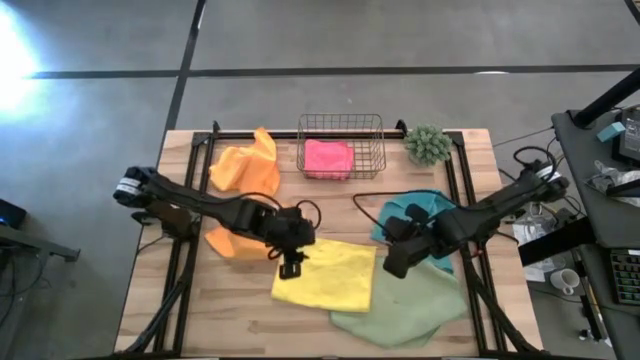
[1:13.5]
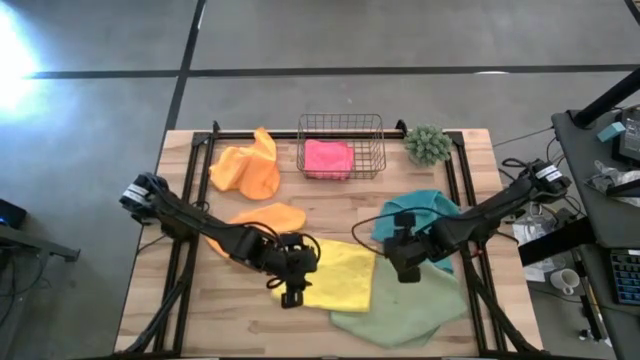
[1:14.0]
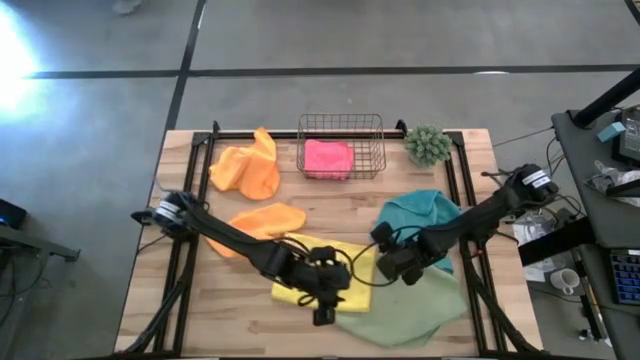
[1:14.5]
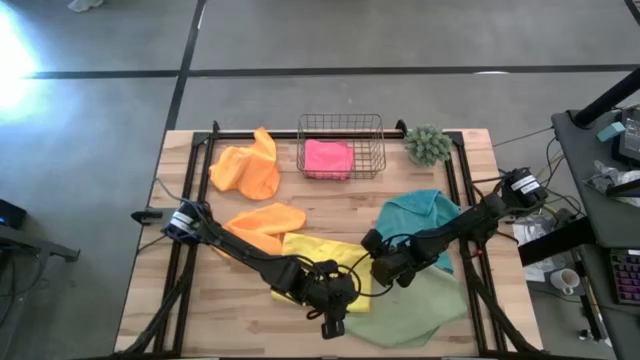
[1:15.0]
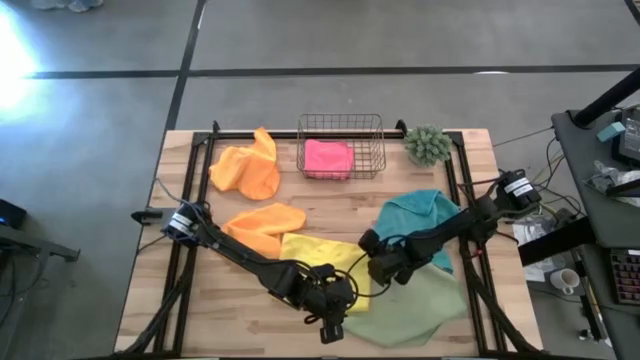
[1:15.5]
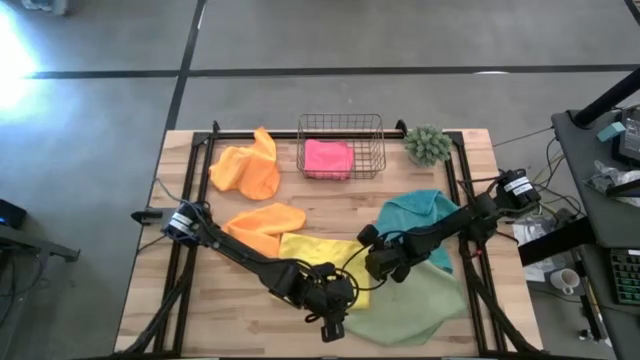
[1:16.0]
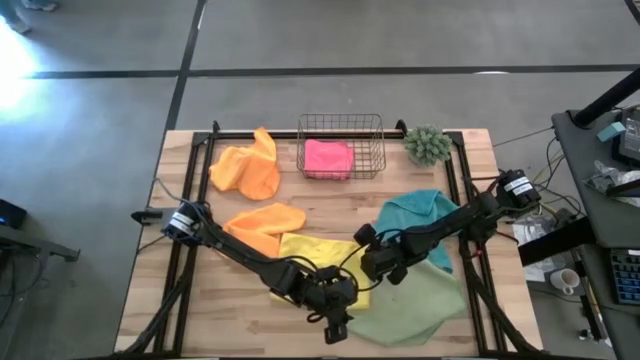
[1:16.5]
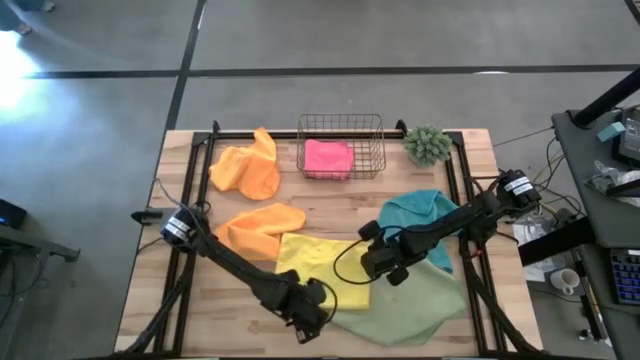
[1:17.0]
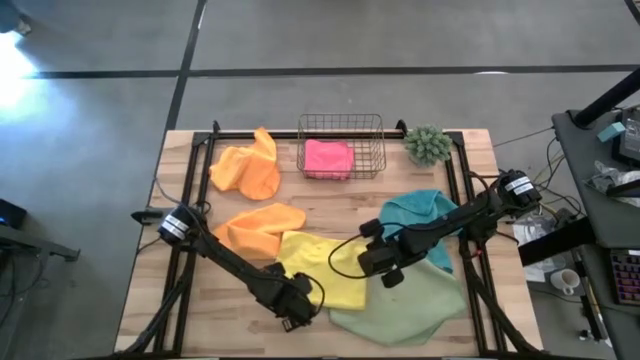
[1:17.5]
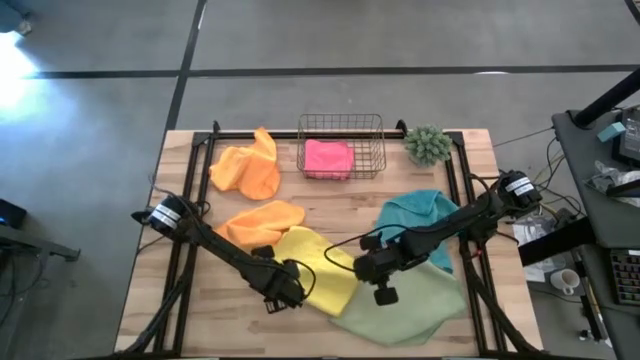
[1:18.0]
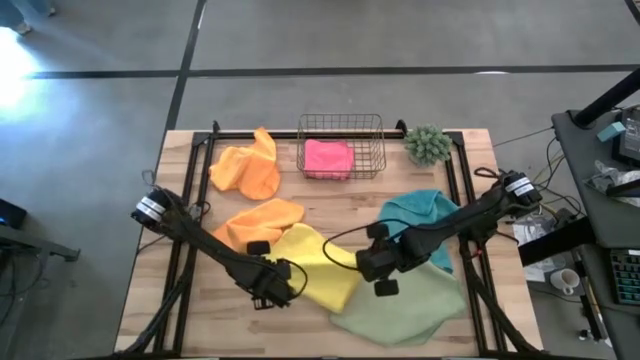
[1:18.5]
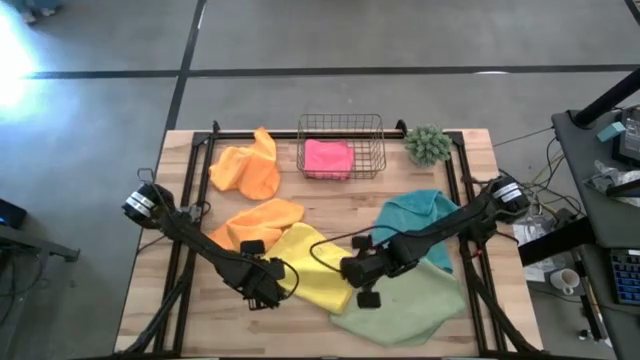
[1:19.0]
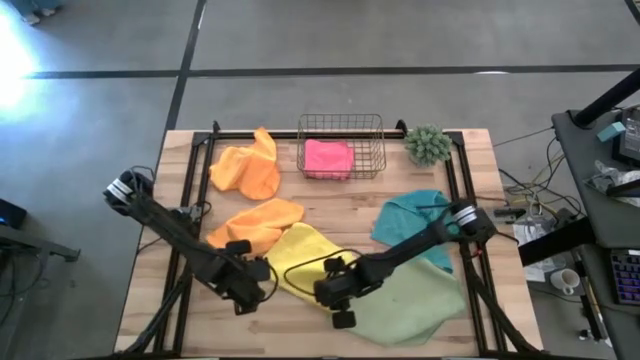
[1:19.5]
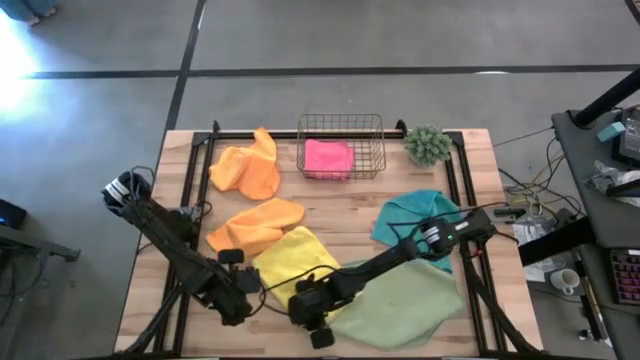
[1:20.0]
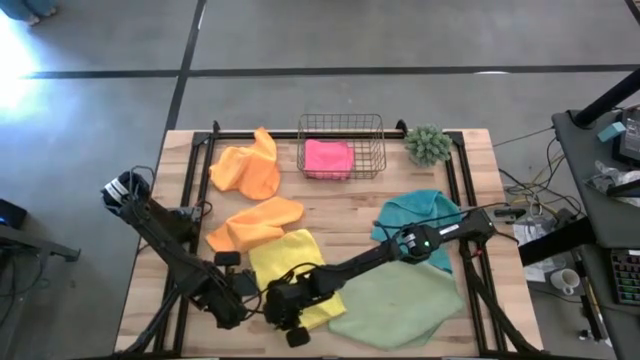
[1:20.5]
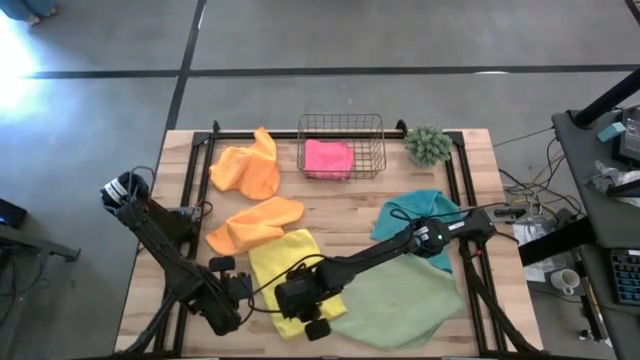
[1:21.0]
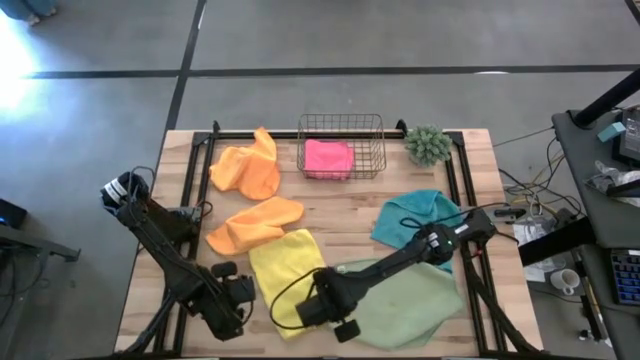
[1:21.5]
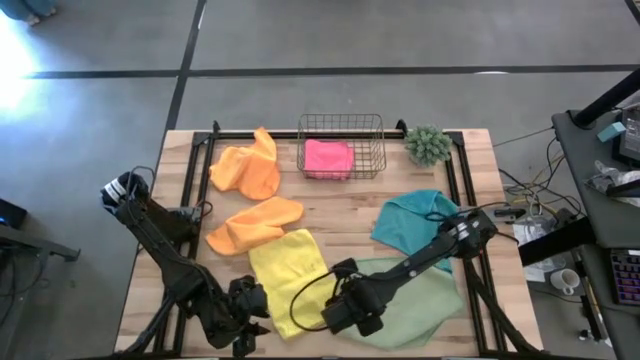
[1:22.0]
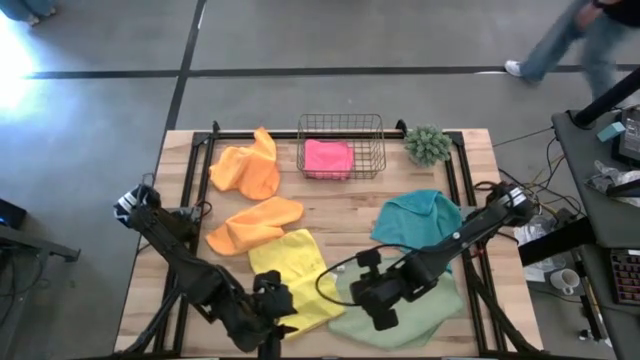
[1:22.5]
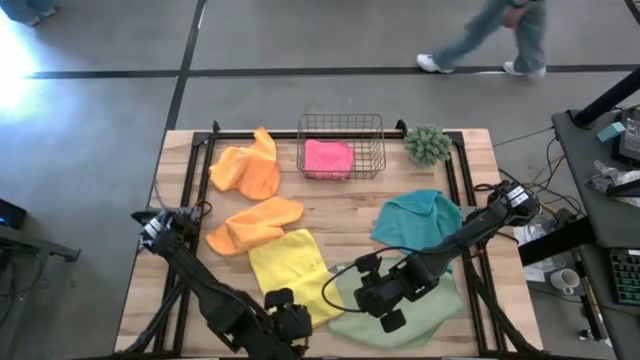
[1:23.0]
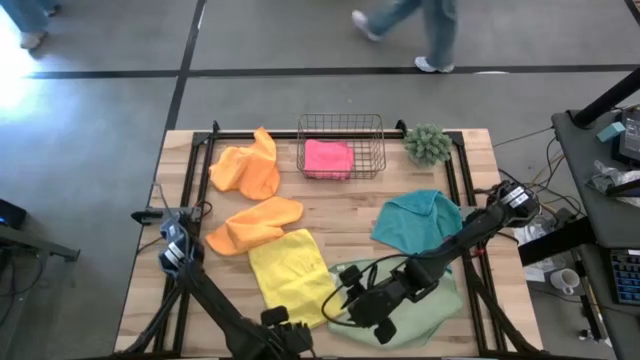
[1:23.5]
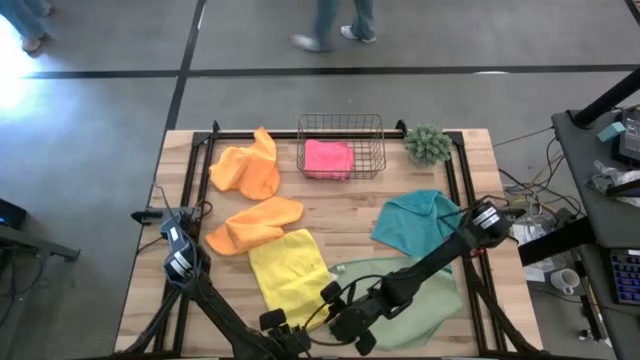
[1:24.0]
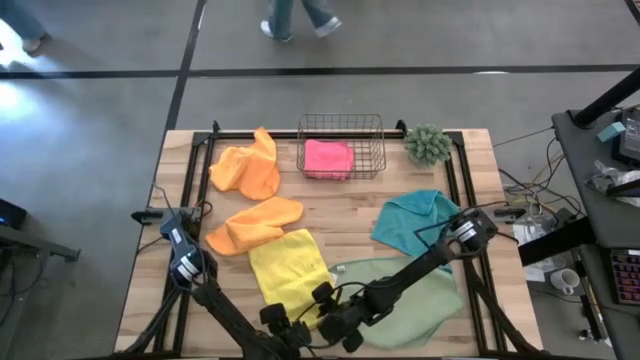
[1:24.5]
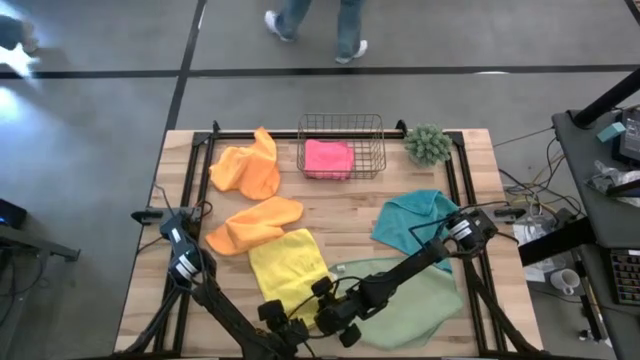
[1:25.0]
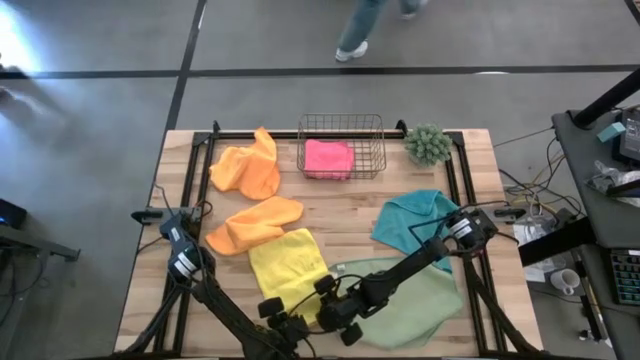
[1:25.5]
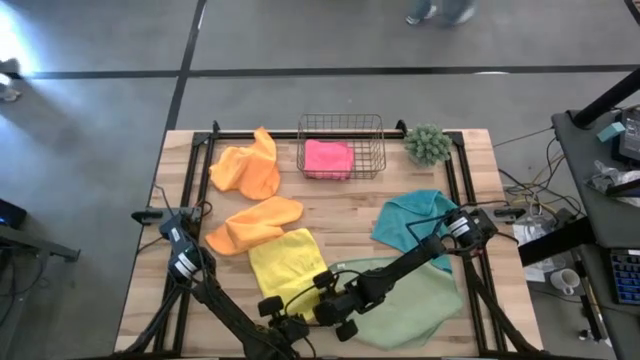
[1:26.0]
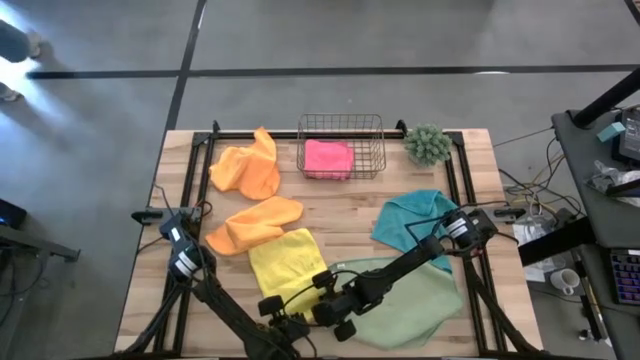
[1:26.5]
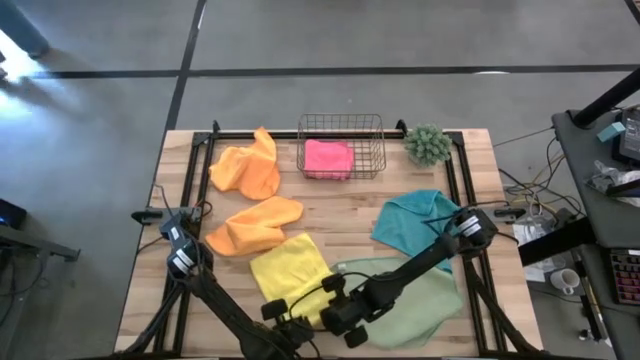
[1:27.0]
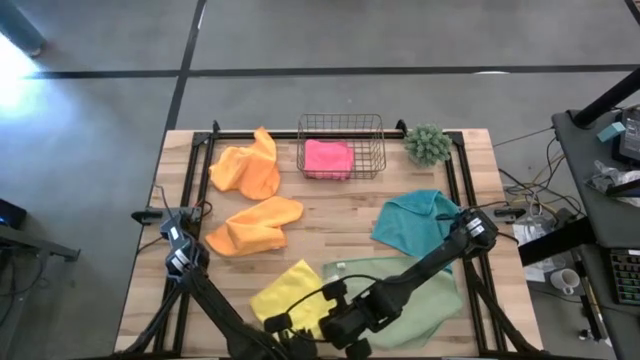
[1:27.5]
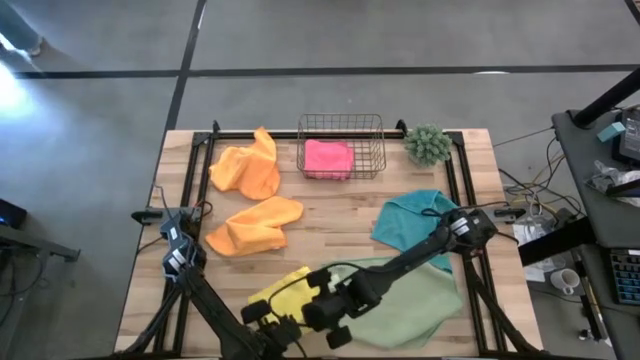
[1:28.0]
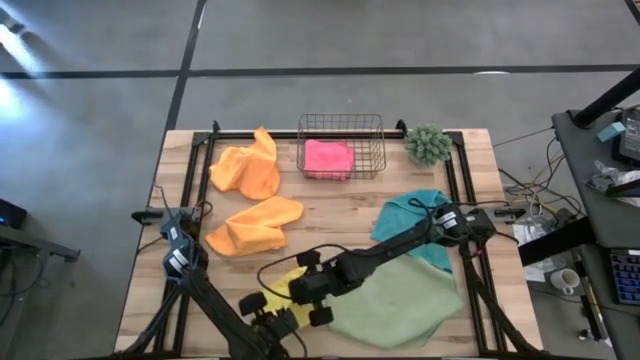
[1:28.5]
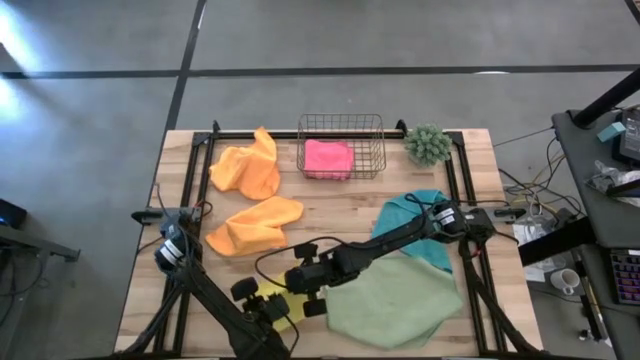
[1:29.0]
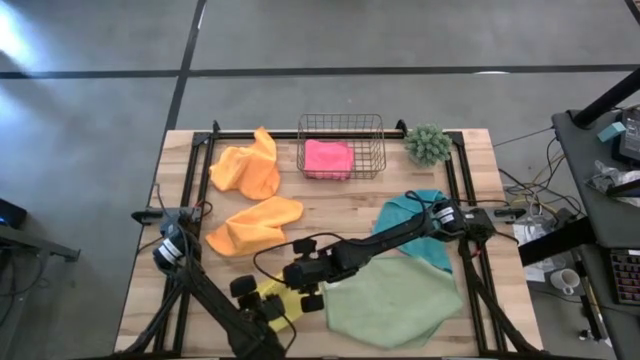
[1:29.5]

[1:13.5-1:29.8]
Task: Fold microfiber towels
Fold the yellow microfiber cloth

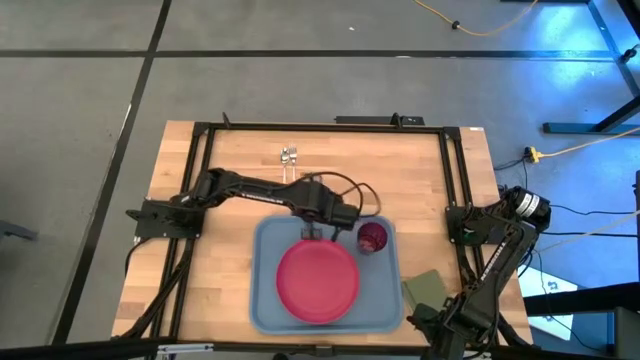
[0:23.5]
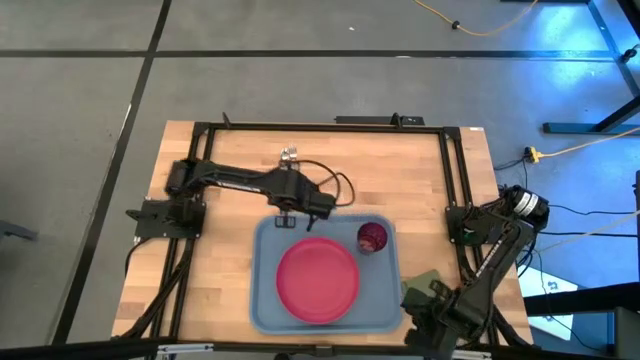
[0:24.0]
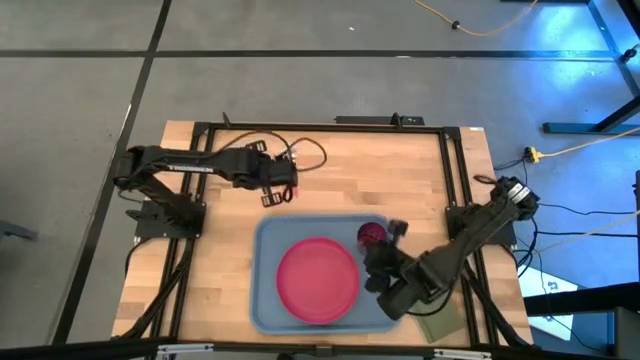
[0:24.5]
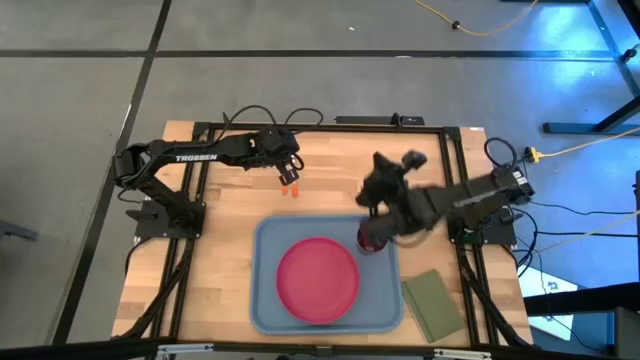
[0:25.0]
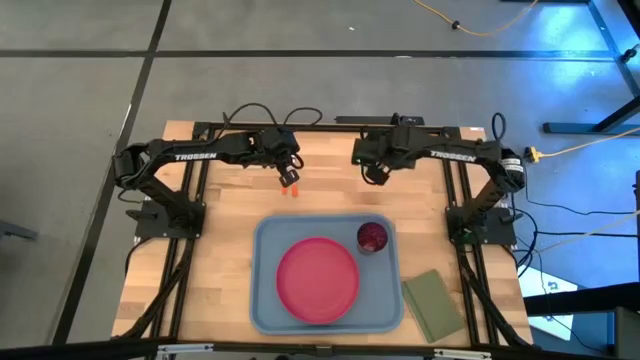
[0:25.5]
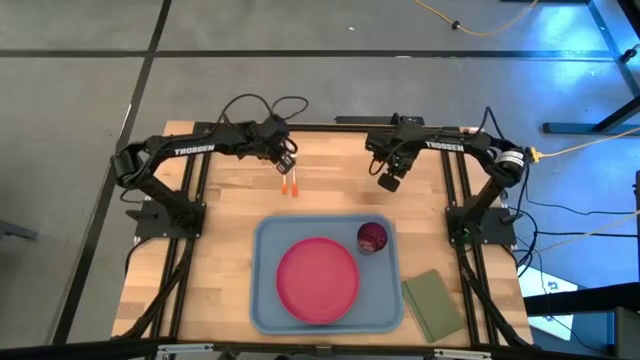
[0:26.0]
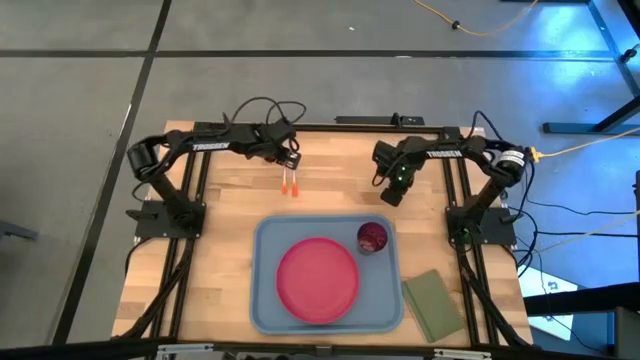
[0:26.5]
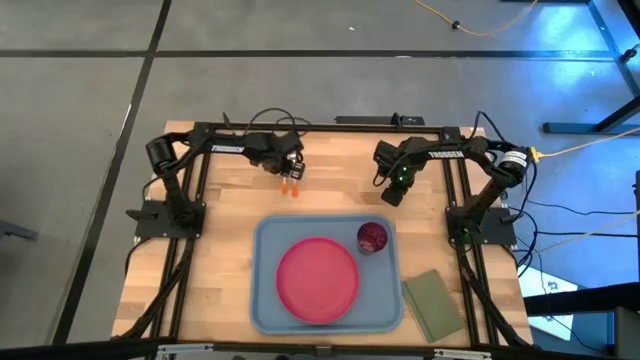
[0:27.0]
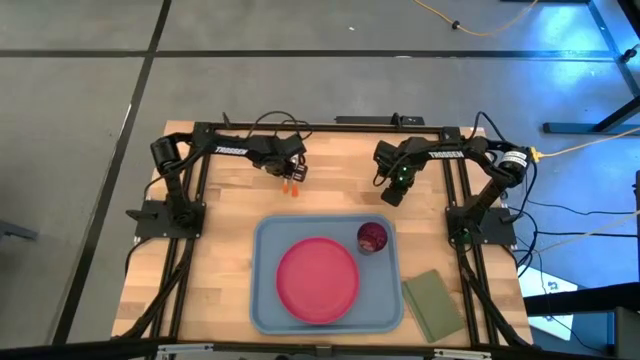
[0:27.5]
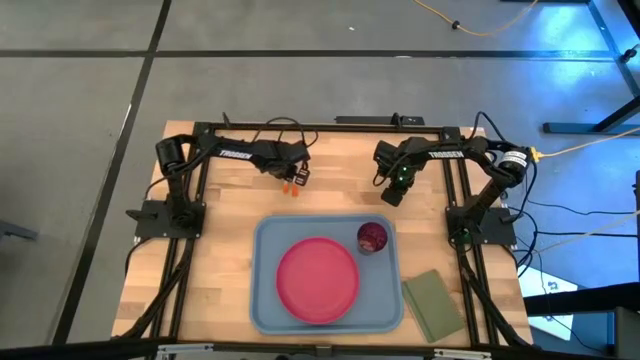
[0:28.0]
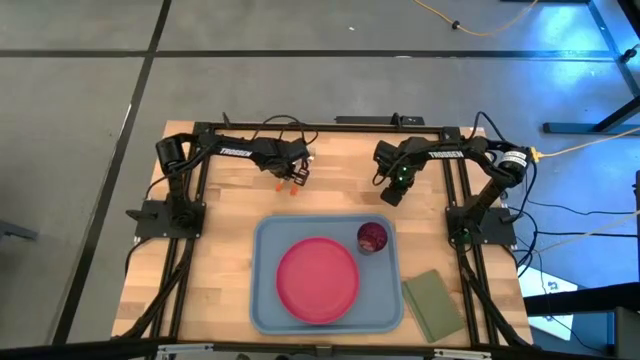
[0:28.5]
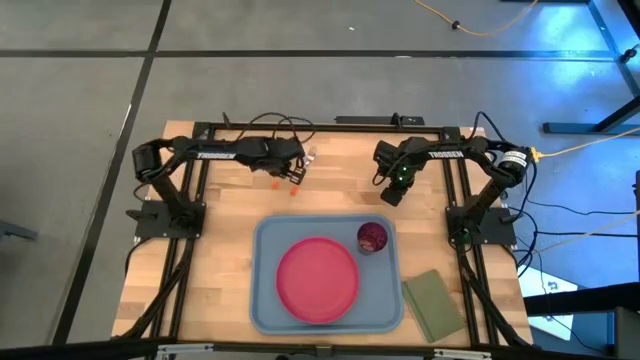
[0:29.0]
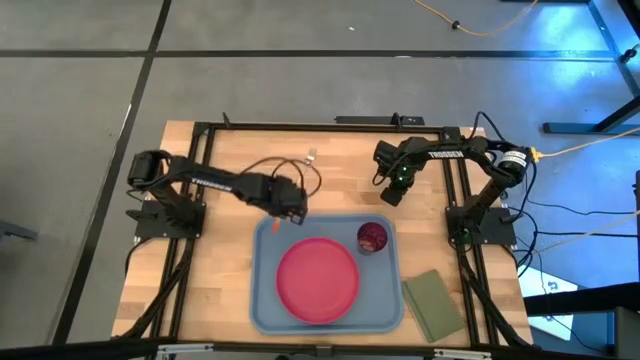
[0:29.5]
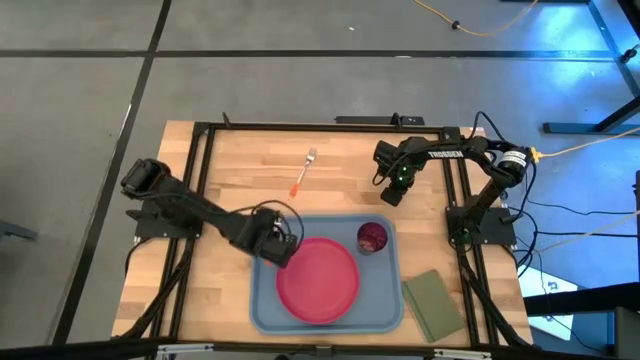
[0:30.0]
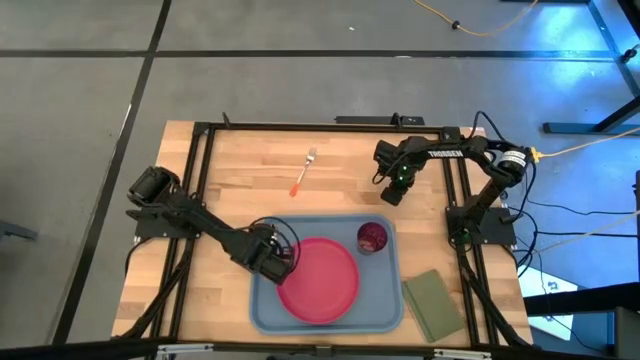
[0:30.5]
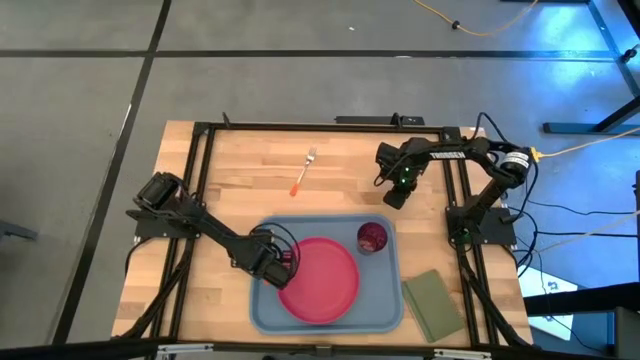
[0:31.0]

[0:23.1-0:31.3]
Task: Pick and place plate/cup/fork/spoon on tray
Put the orange white spoon on the blue tray to the left side of the pink plate
